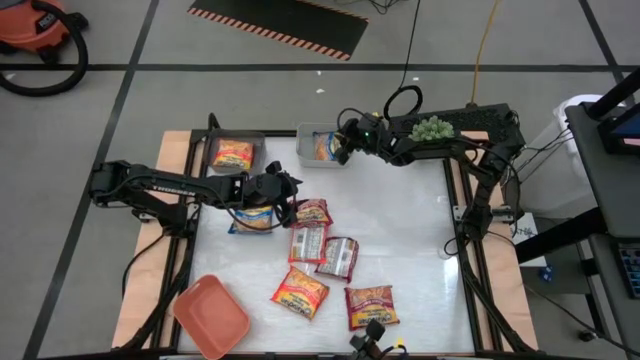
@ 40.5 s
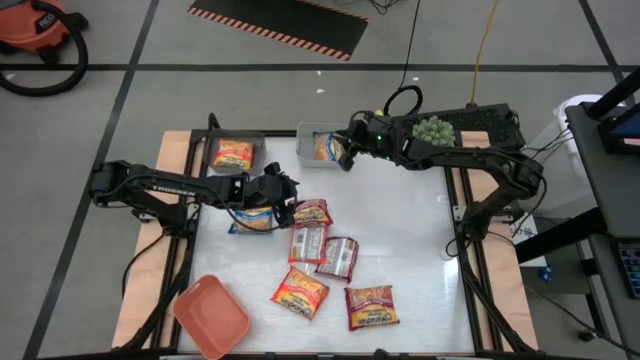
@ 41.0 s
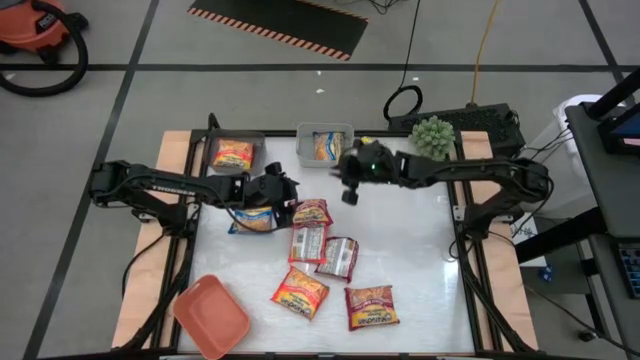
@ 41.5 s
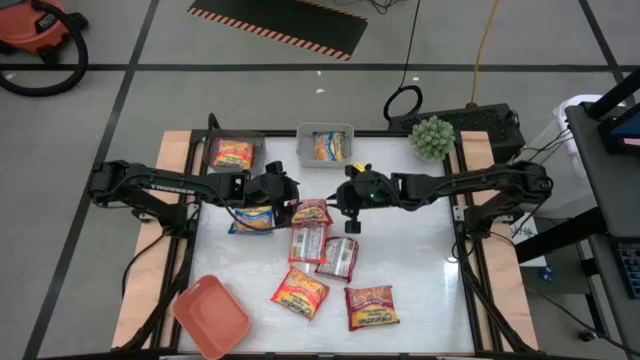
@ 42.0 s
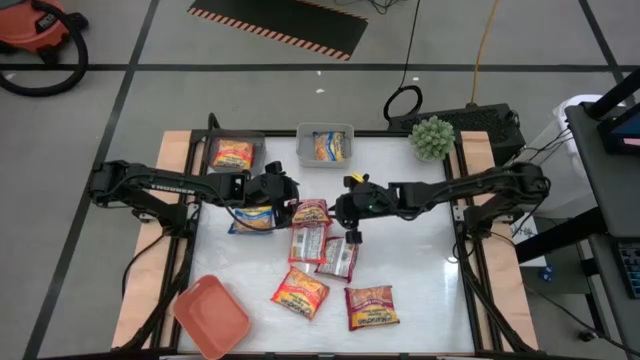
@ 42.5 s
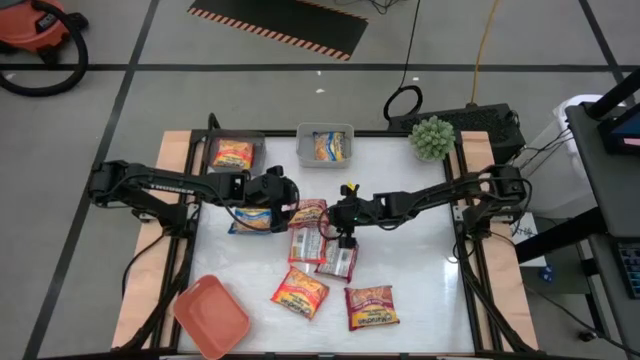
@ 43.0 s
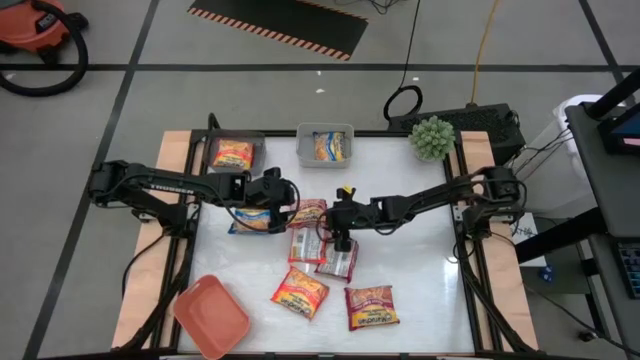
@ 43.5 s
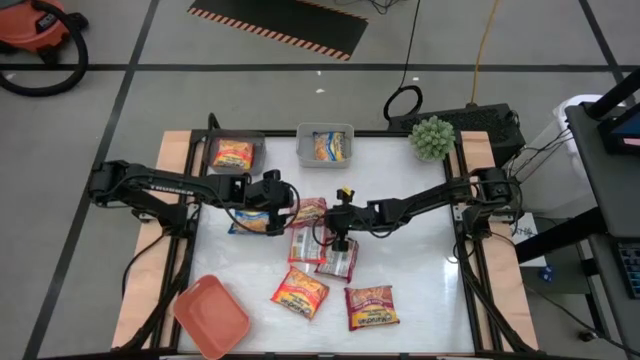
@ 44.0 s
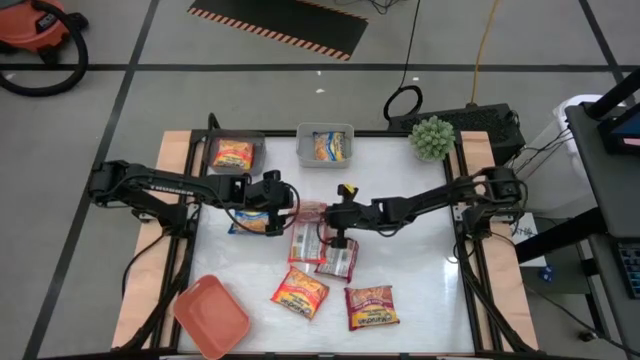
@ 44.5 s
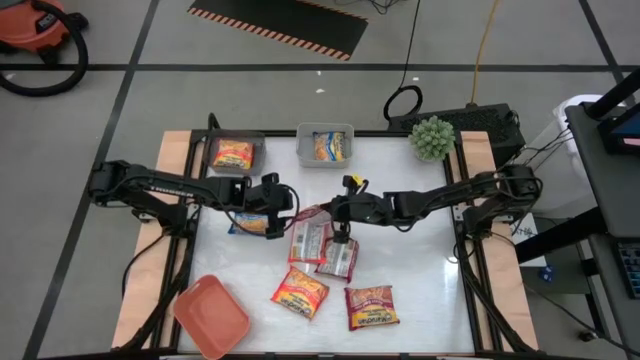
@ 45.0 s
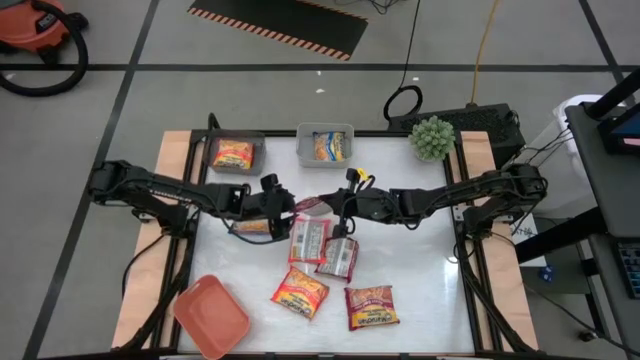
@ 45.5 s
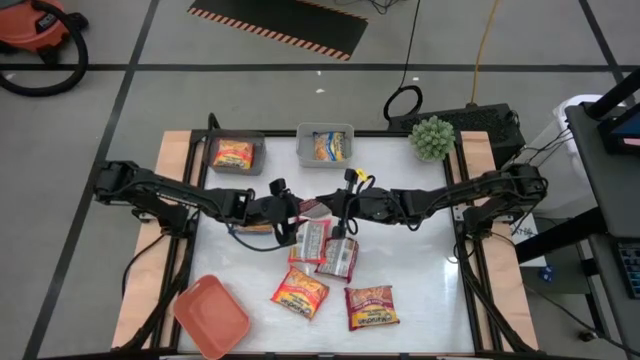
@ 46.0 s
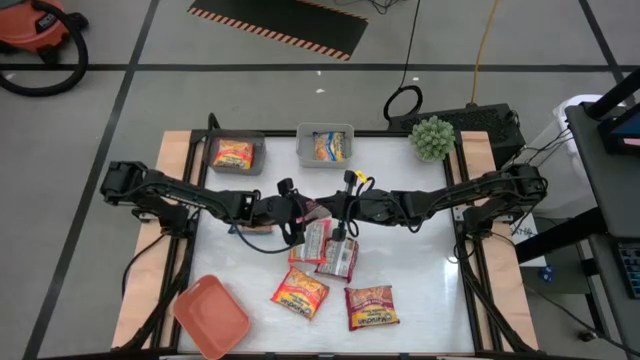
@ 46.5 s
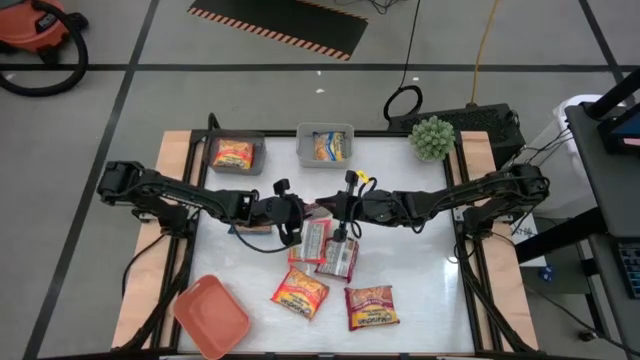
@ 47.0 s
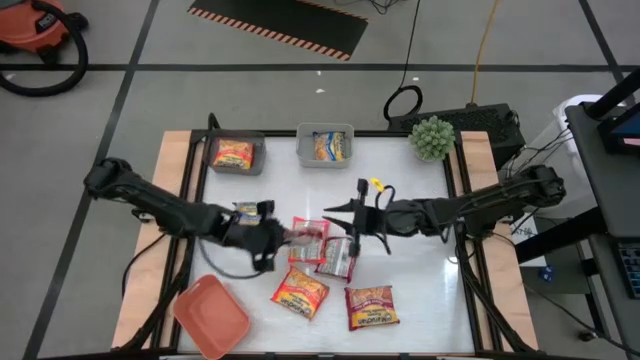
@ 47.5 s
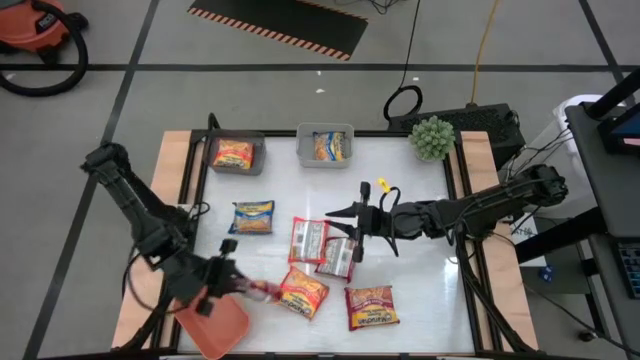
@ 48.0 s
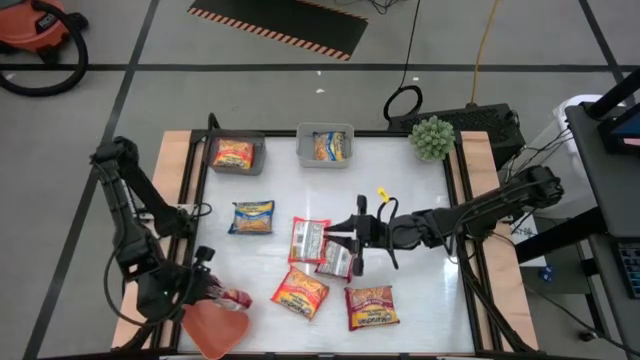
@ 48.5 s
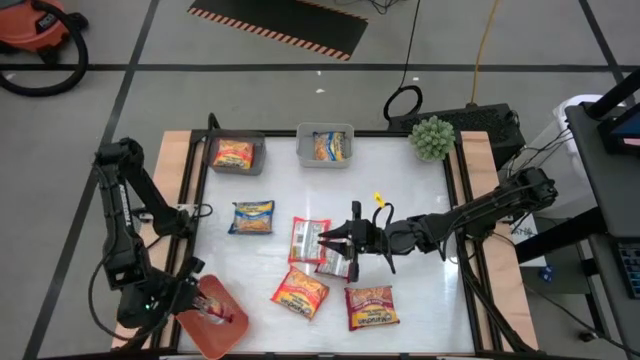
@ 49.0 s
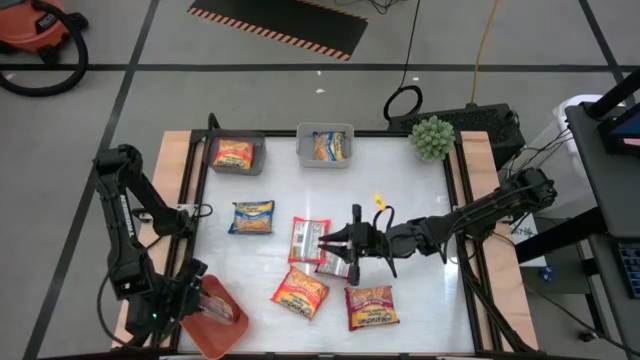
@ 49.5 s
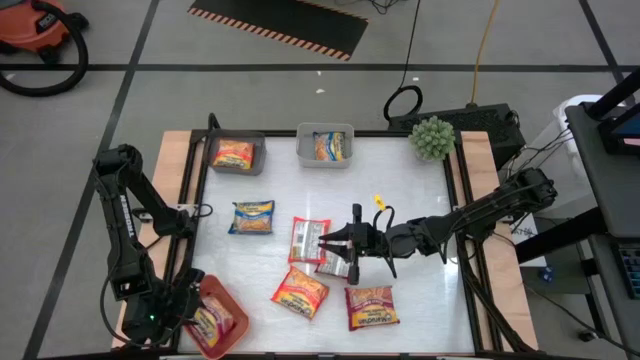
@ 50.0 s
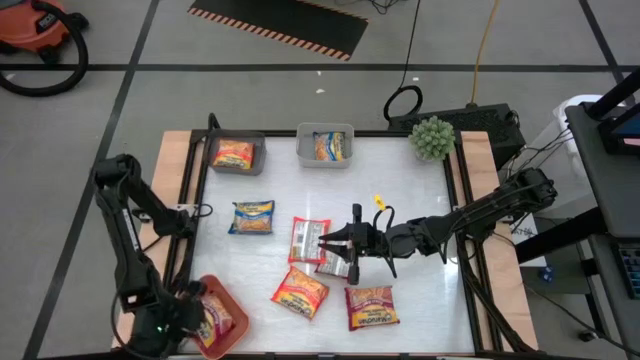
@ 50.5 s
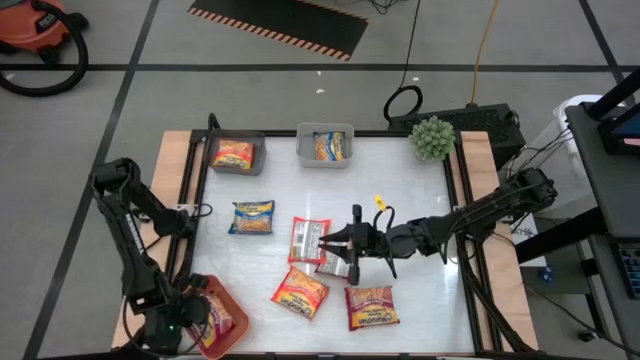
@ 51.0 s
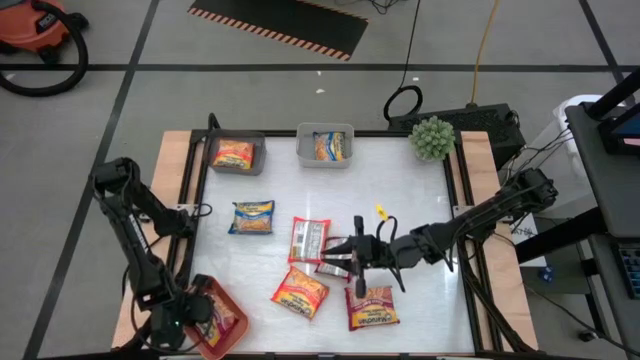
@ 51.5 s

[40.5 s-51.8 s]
Task: Sort Maruchan noodles
Put the top red noodle pack into the orange bin

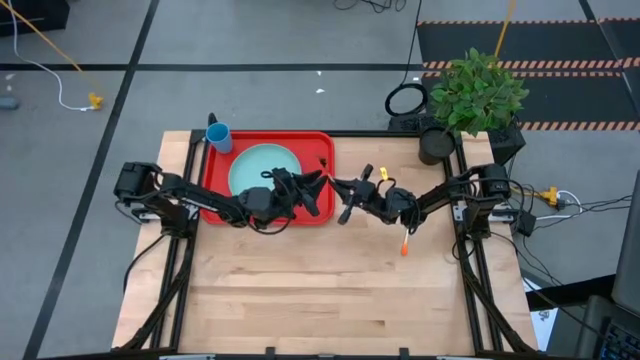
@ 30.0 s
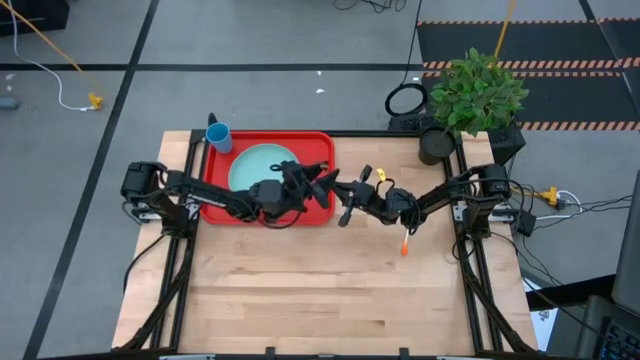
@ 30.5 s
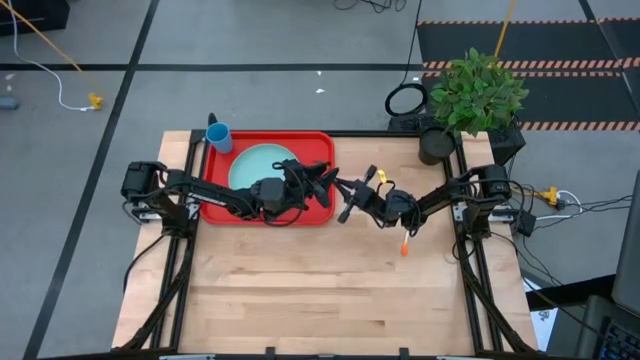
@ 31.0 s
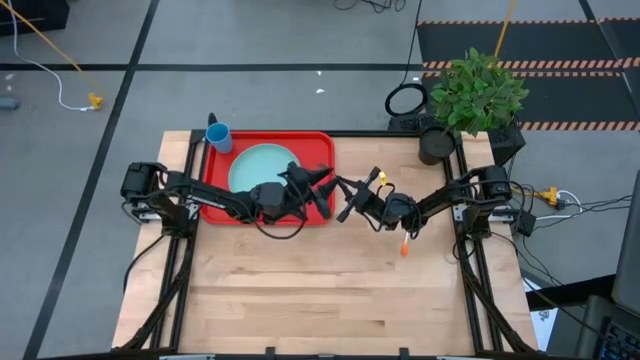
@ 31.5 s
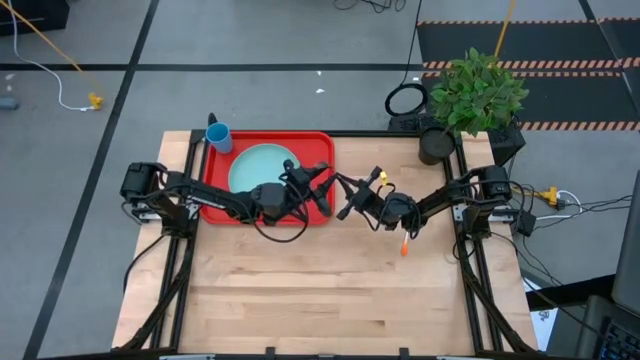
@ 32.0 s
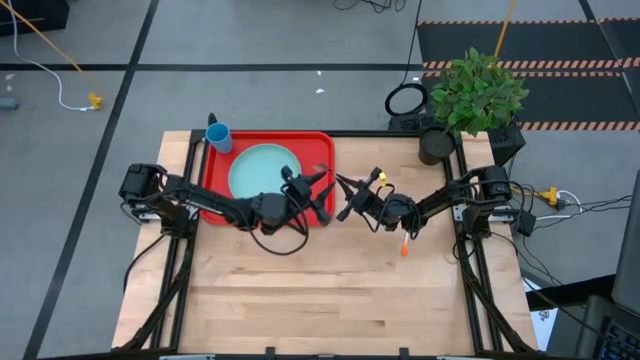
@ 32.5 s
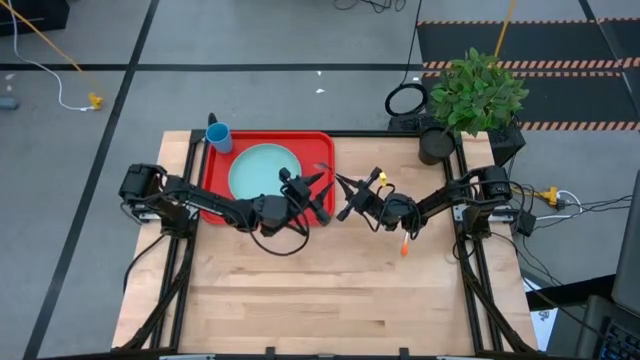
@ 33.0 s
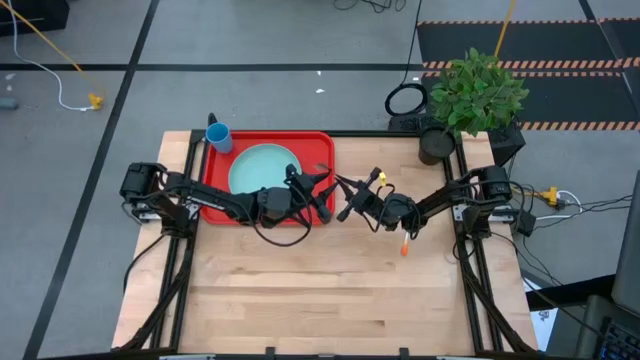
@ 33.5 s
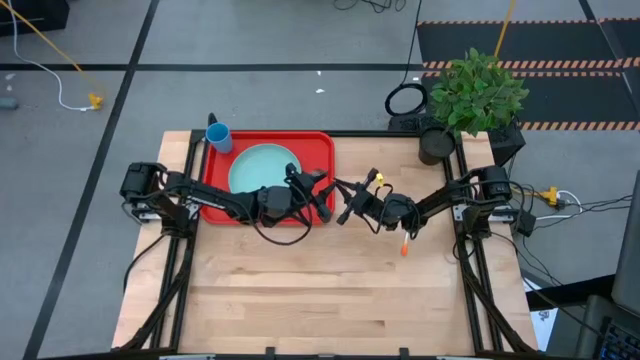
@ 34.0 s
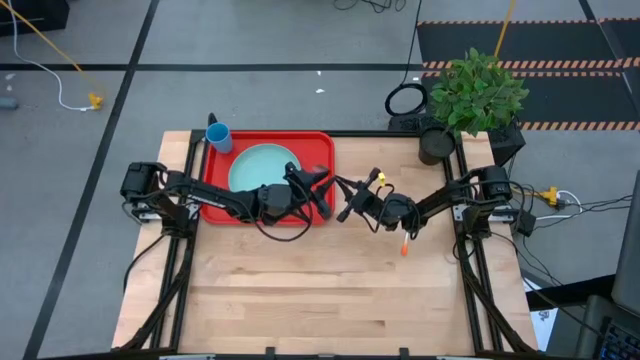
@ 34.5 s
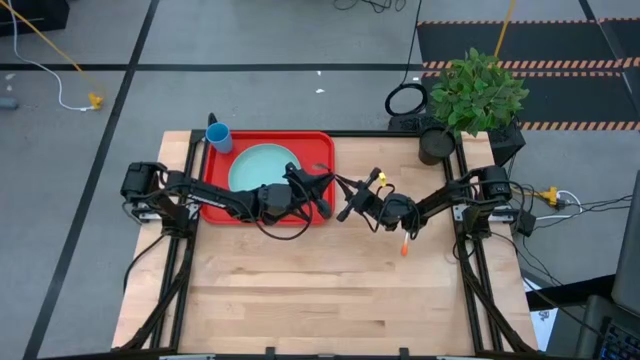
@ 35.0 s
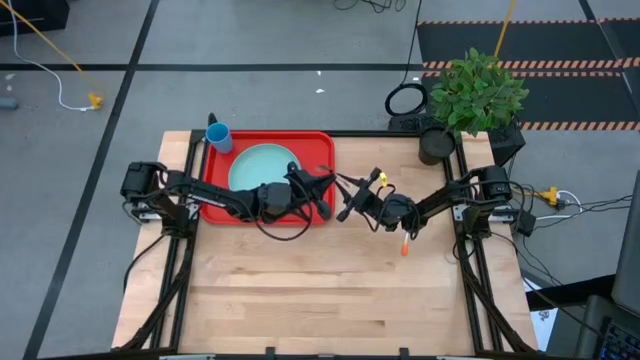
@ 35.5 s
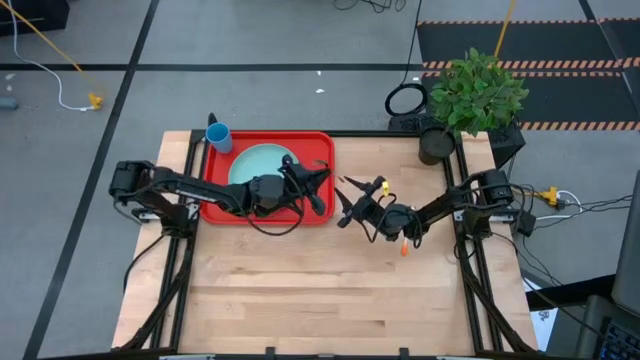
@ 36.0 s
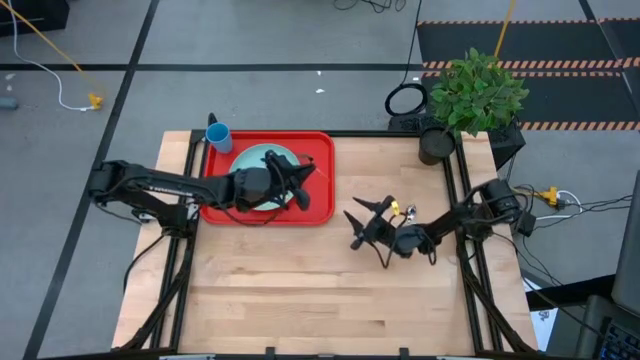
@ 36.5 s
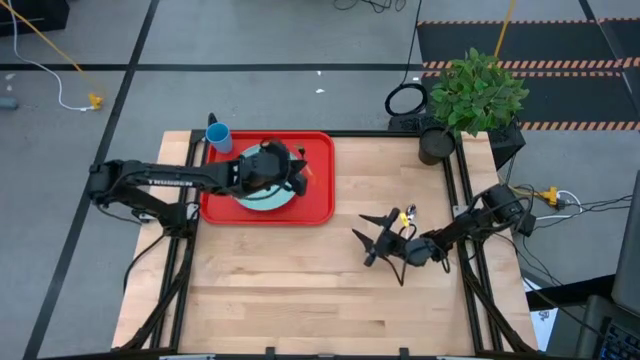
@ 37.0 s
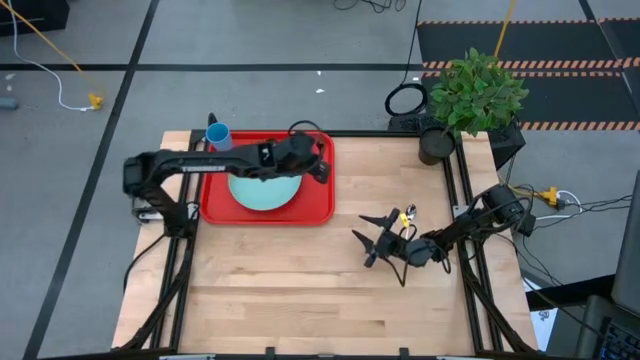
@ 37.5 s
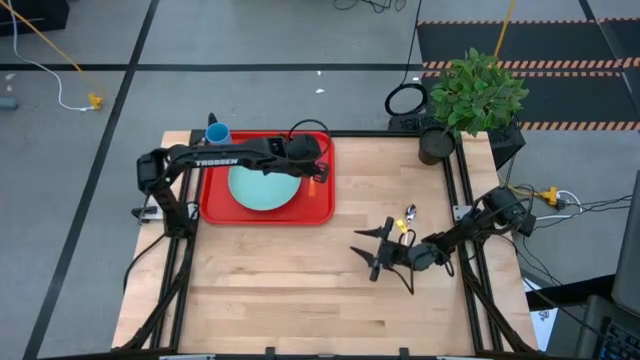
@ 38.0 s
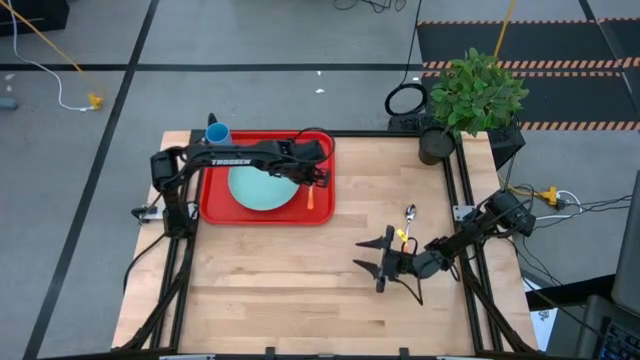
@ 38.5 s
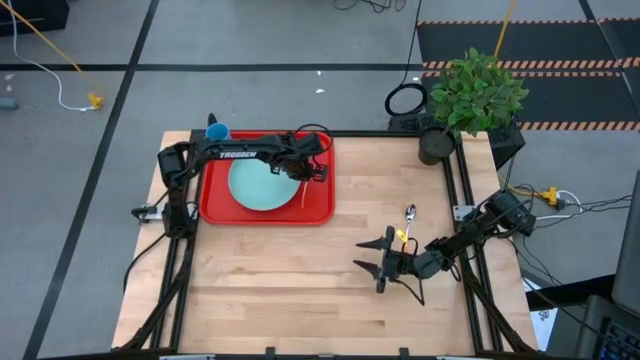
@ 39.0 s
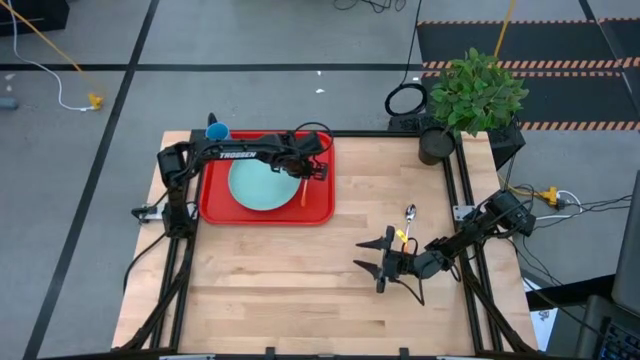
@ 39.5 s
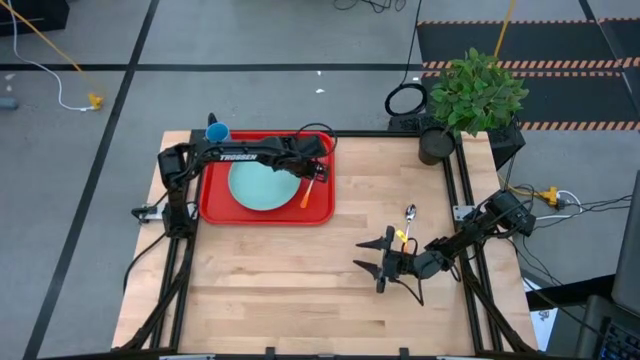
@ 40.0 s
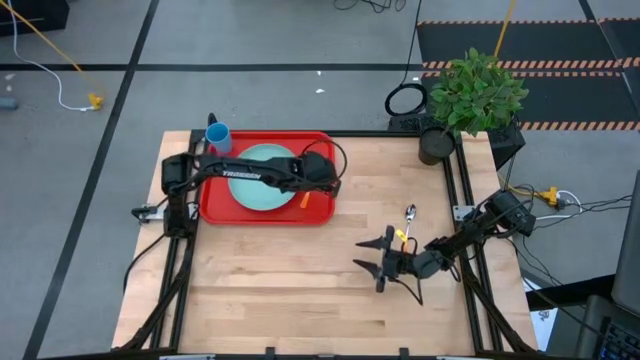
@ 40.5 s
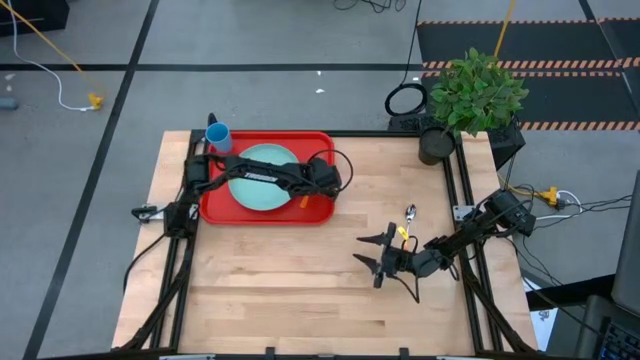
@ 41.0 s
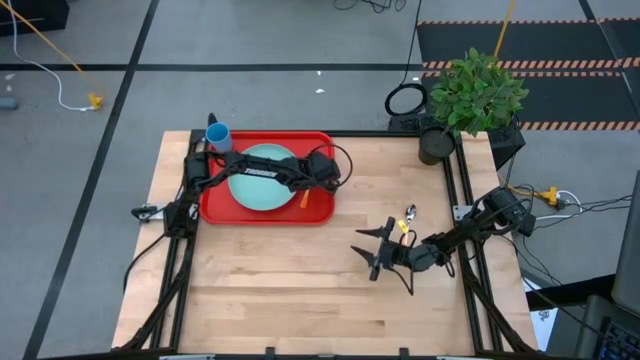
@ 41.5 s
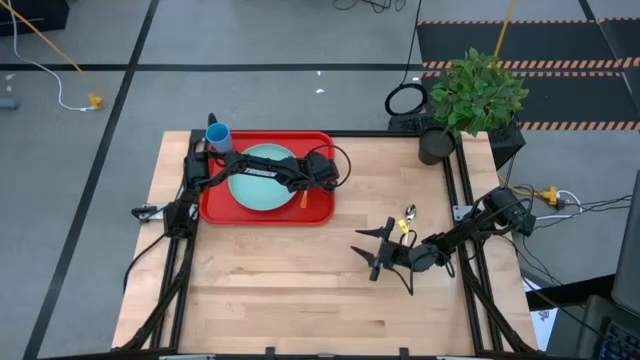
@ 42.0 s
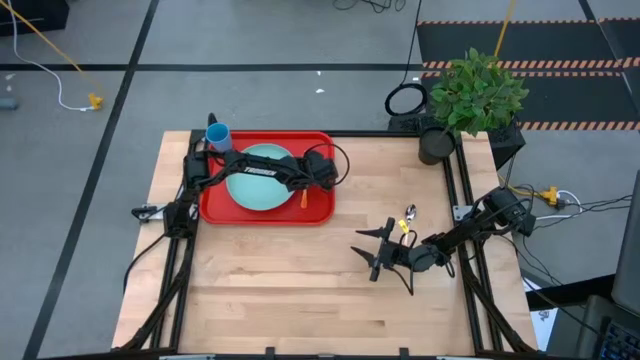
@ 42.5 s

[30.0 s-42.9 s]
Task: Pick and place plate/cup/fork/spoon on tray
Put the orange fork on the red serving tray to the right of the light green plate
